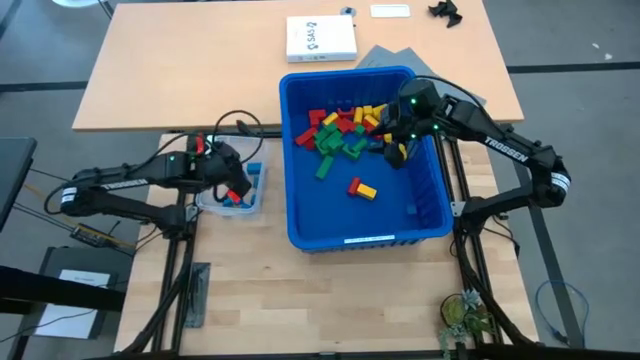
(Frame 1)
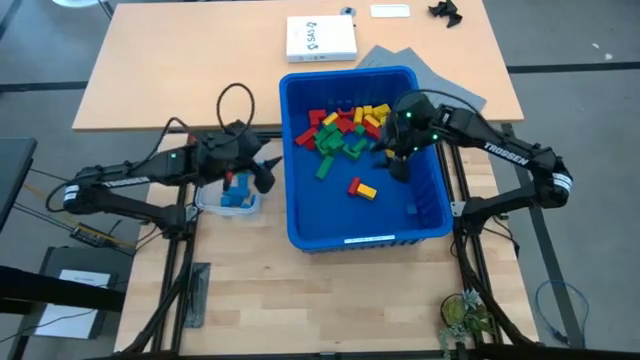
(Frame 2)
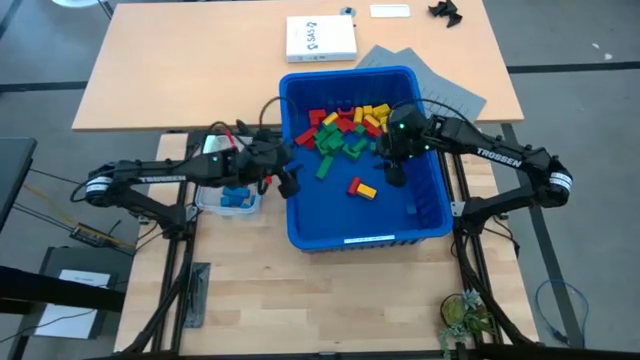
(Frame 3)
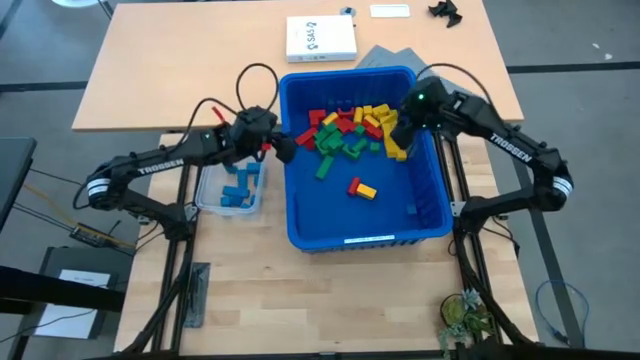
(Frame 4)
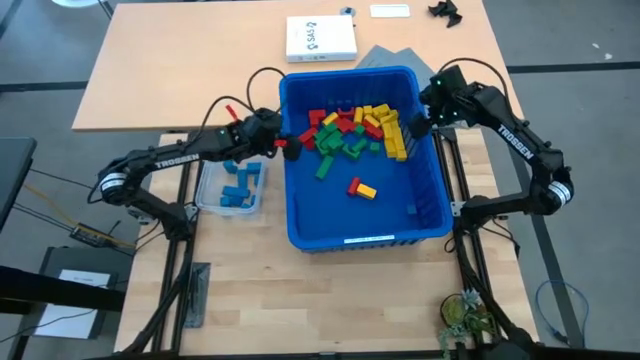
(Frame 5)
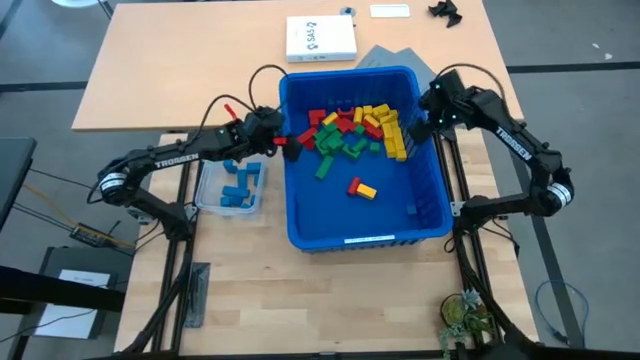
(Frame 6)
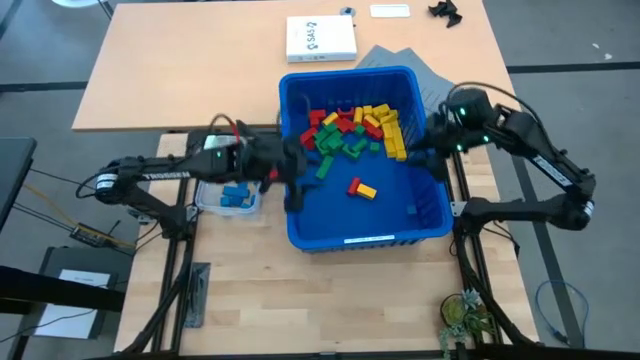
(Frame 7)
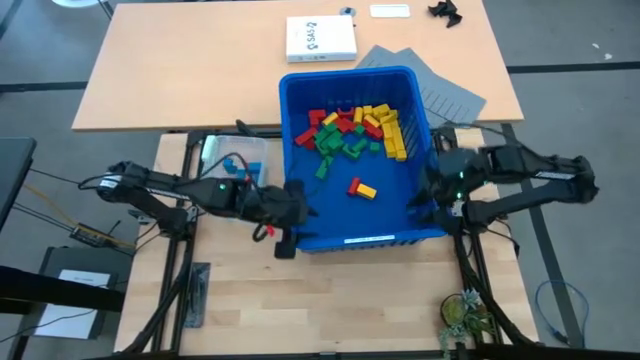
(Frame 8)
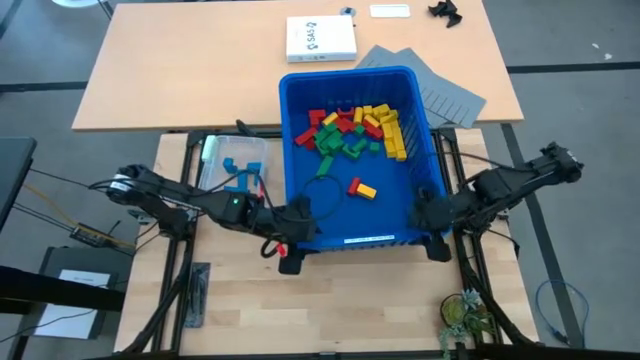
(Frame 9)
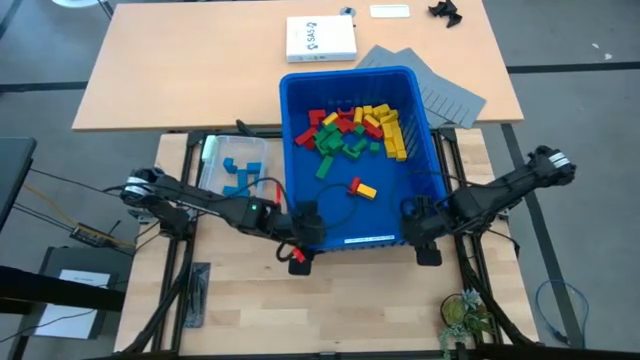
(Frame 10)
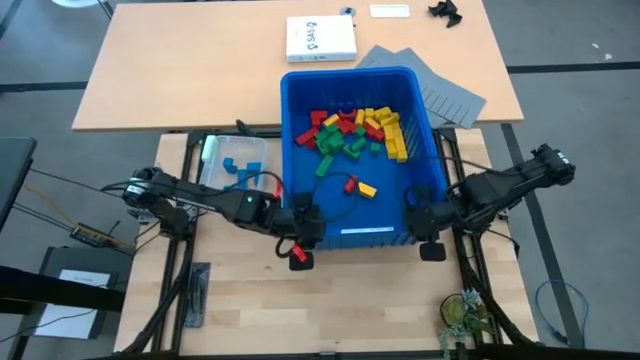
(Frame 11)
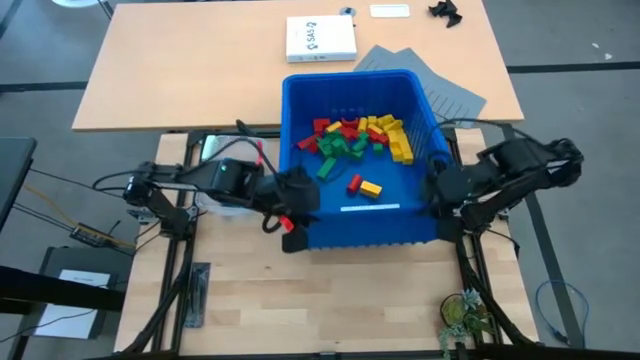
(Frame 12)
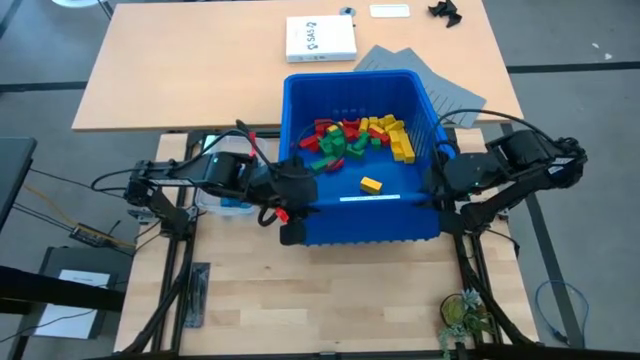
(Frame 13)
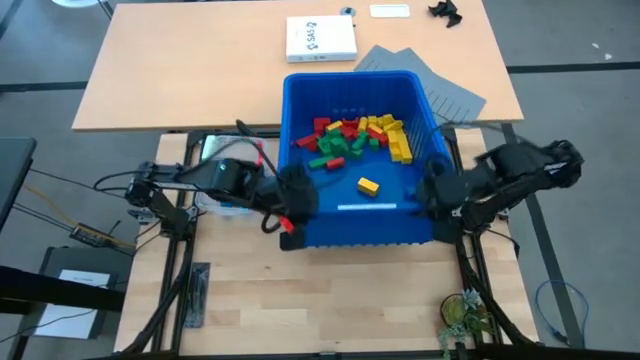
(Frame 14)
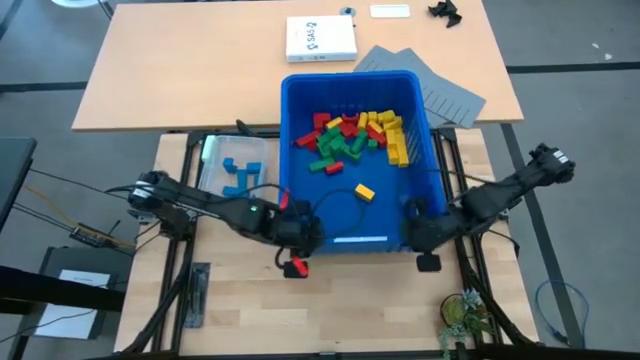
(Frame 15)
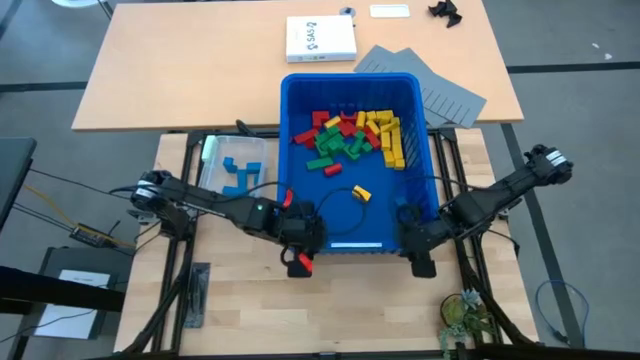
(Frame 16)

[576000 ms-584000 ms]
Task: Sort blocks
Adjust the blue bin

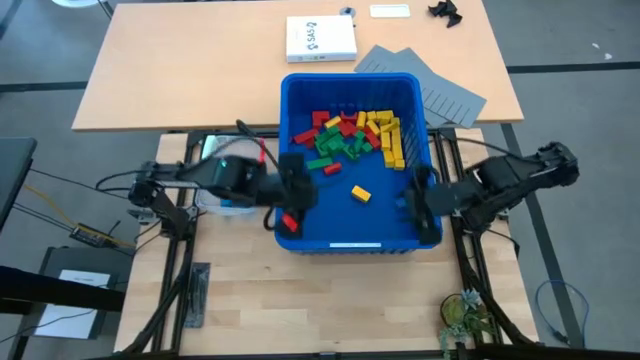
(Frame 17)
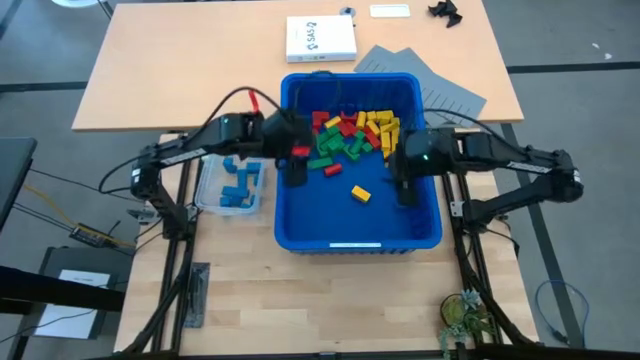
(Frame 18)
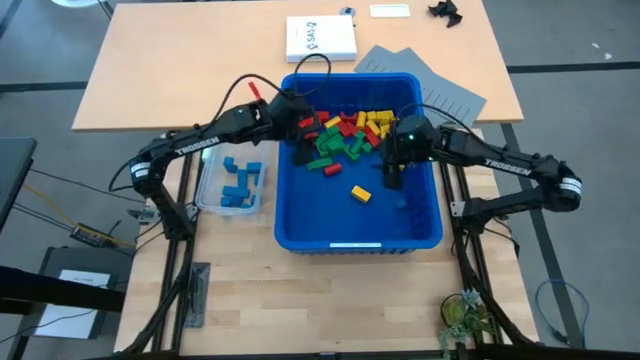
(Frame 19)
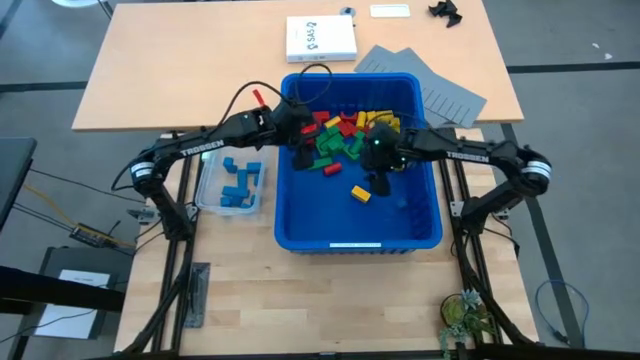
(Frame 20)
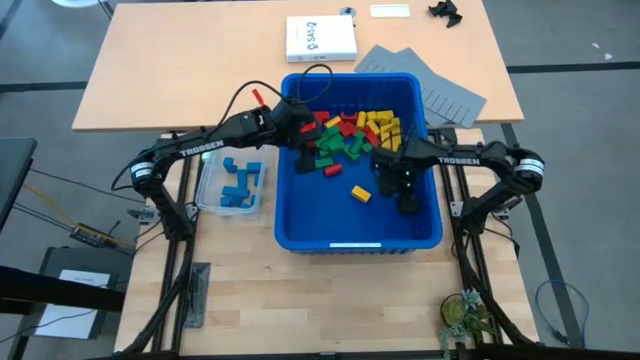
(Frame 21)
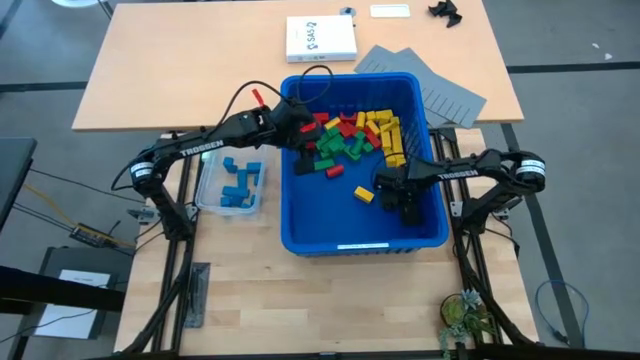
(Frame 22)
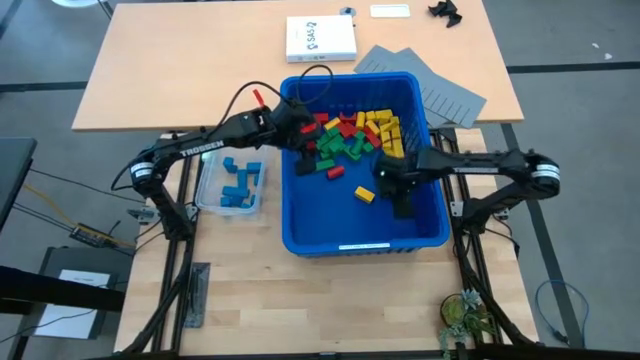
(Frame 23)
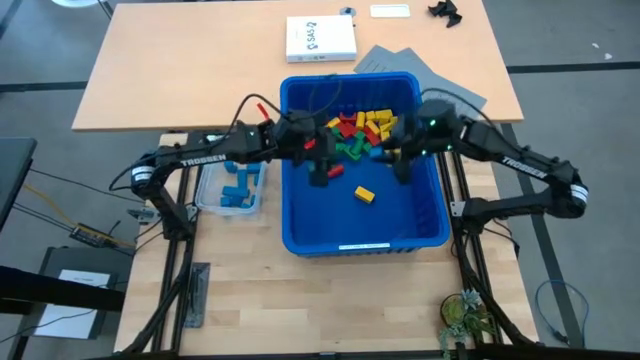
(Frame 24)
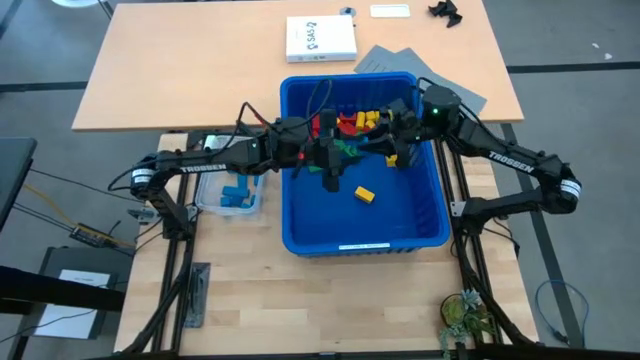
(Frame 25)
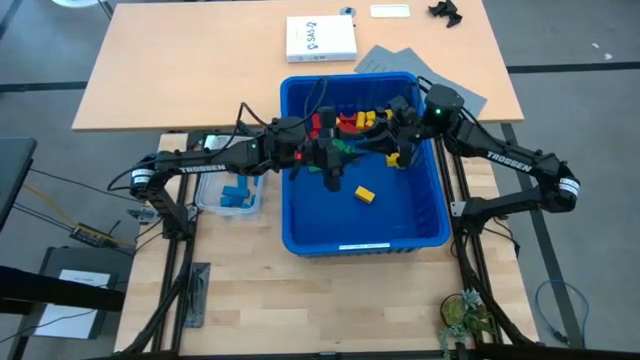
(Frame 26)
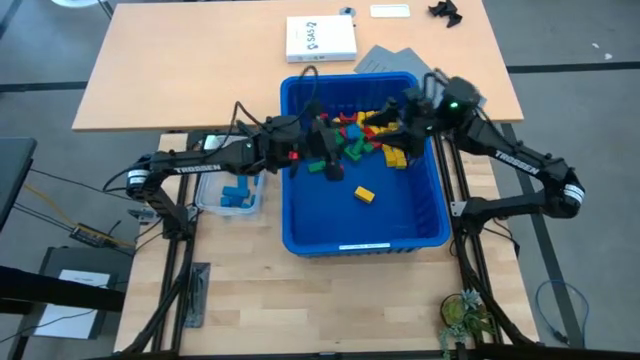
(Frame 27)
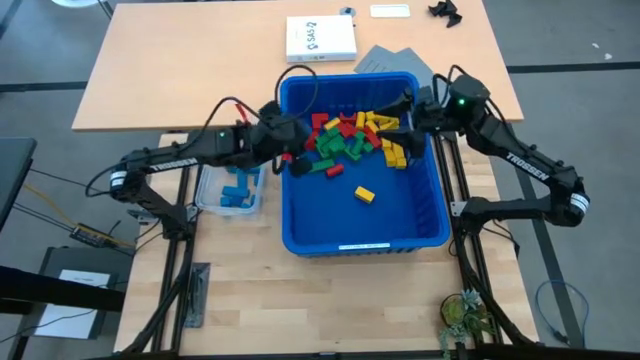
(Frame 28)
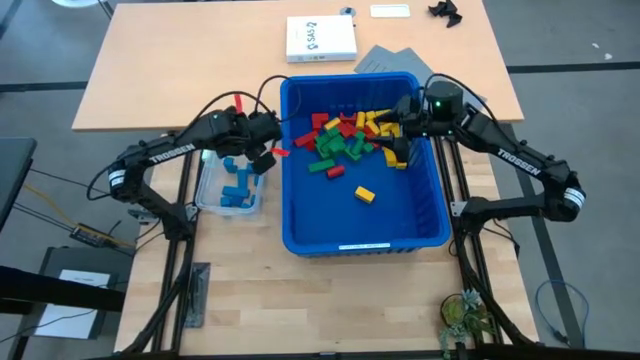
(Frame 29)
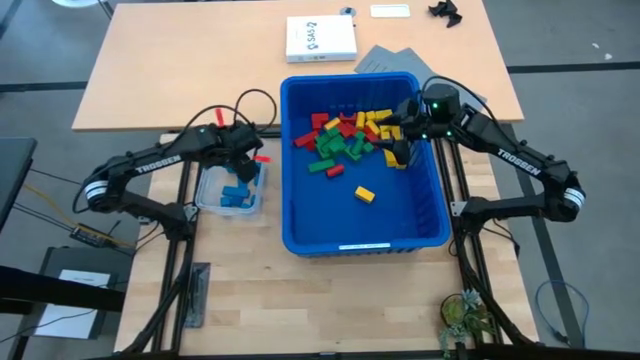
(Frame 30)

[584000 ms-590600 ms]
Put the blue block into the transparent bin

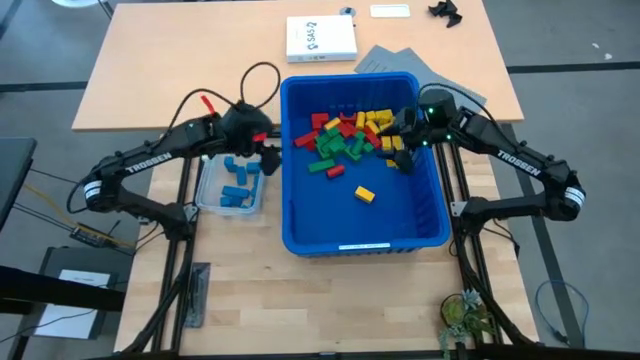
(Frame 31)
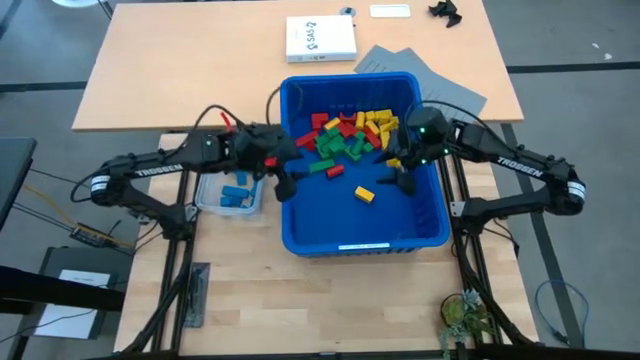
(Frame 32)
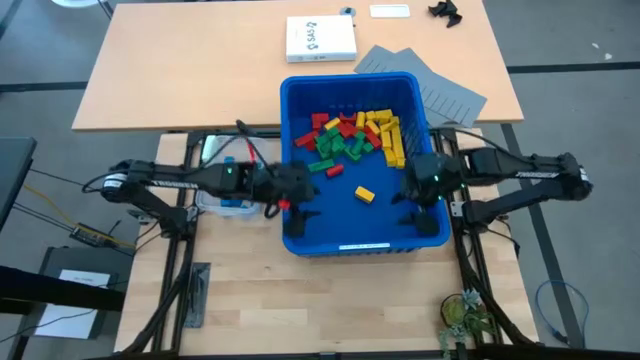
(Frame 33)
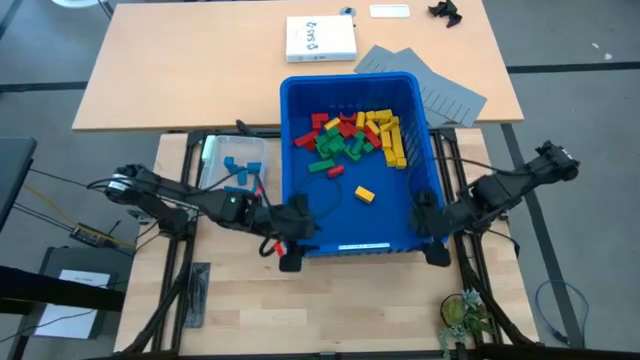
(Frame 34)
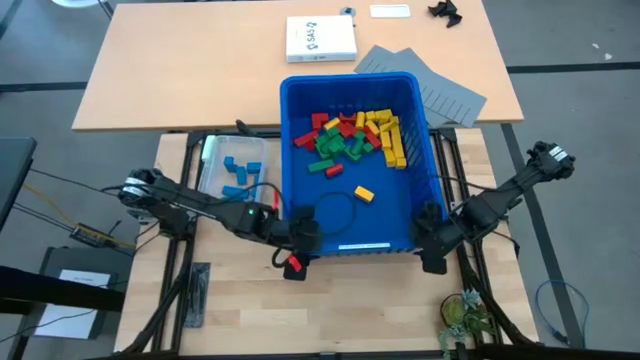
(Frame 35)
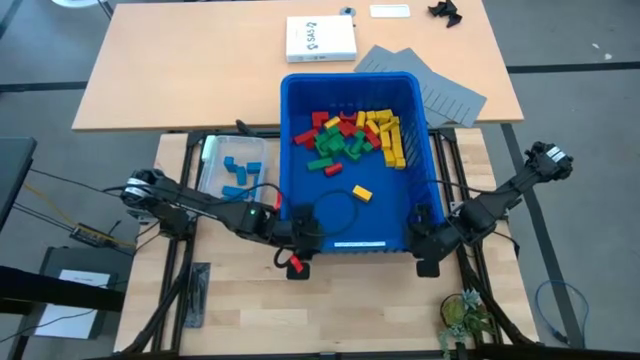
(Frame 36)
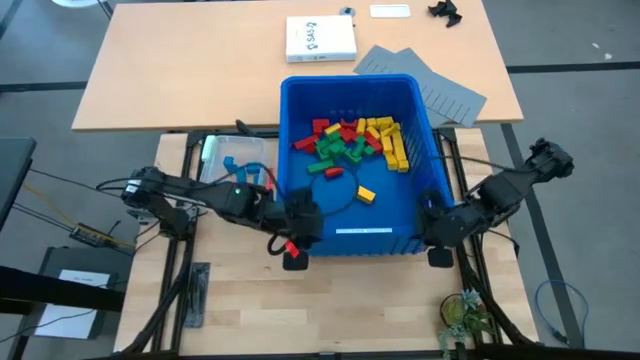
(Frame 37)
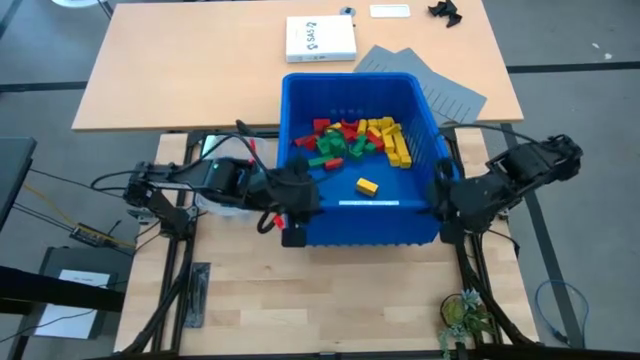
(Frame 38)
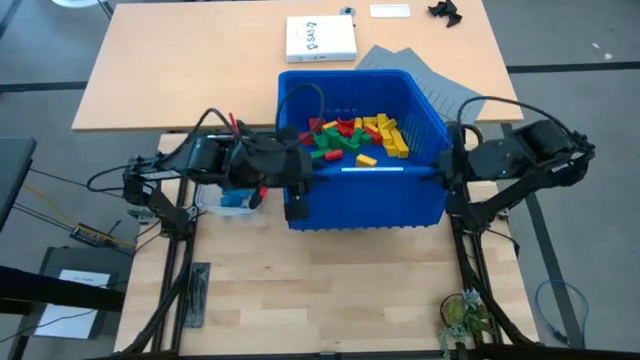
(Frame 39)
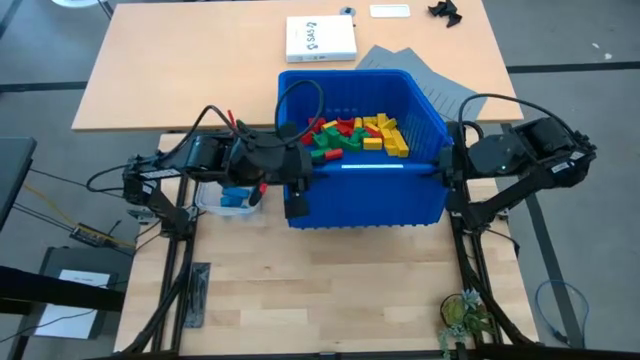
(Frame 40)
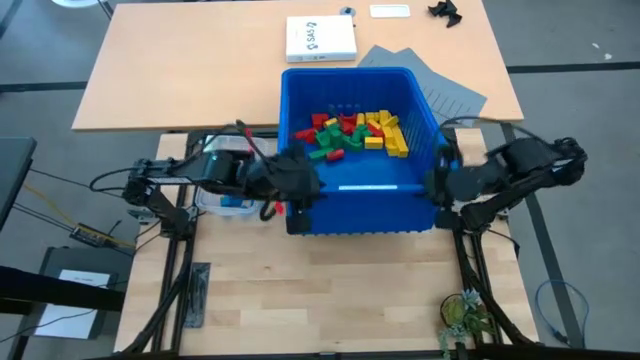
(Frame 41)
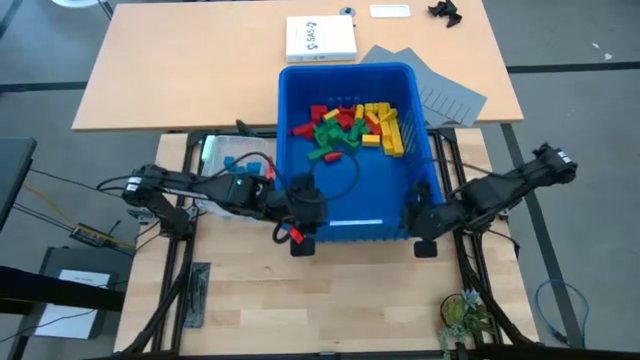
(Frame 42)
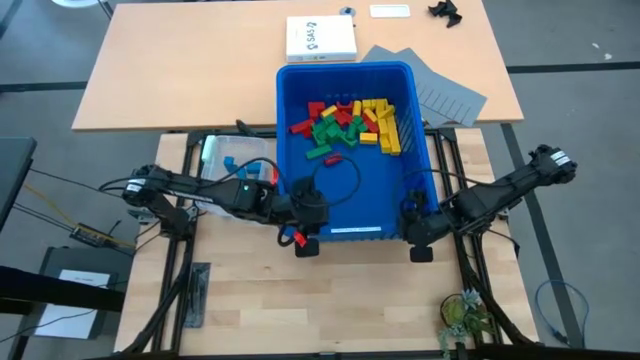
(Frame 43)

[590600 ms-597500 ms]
Adjust the blue bin
